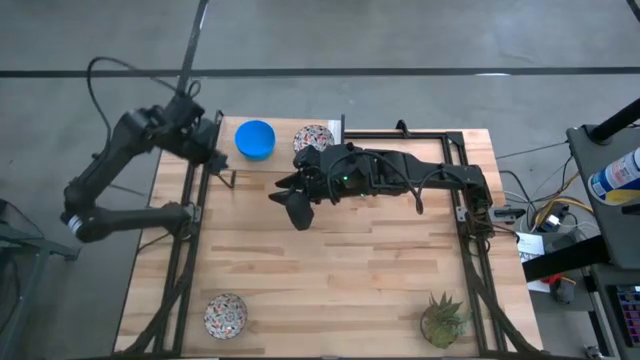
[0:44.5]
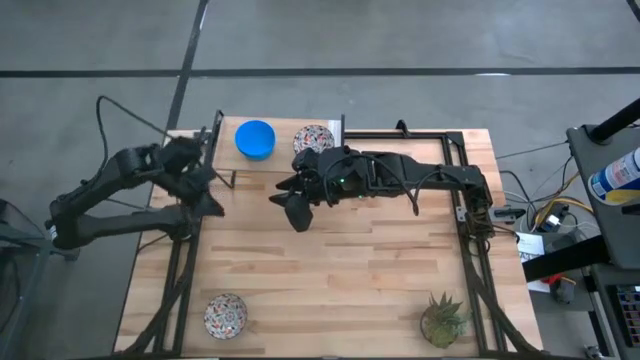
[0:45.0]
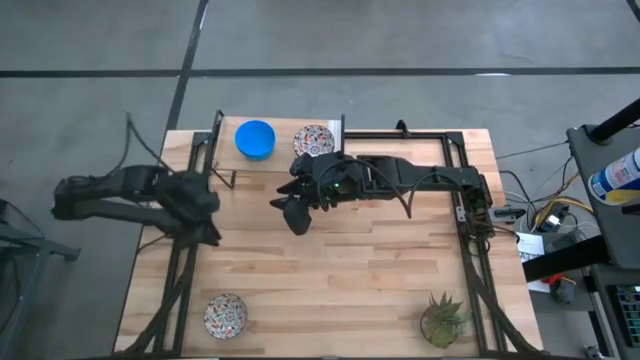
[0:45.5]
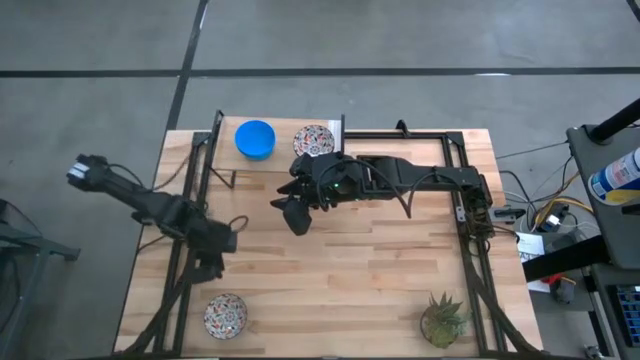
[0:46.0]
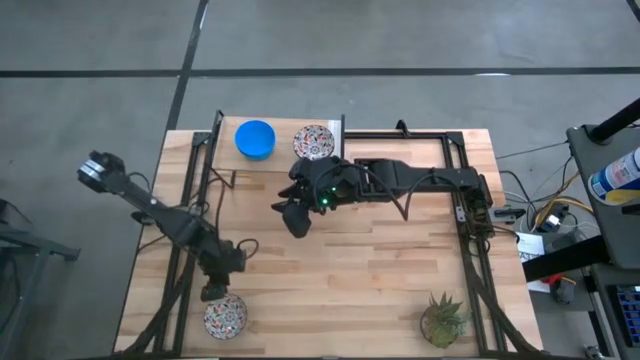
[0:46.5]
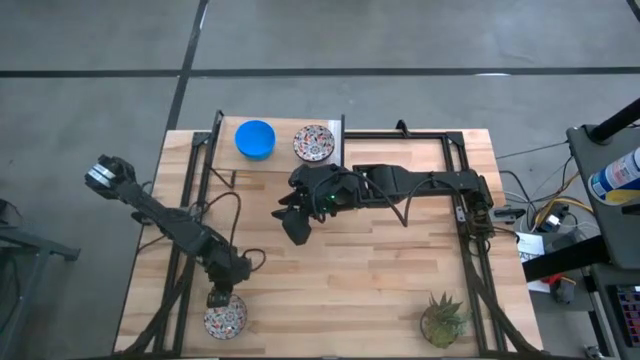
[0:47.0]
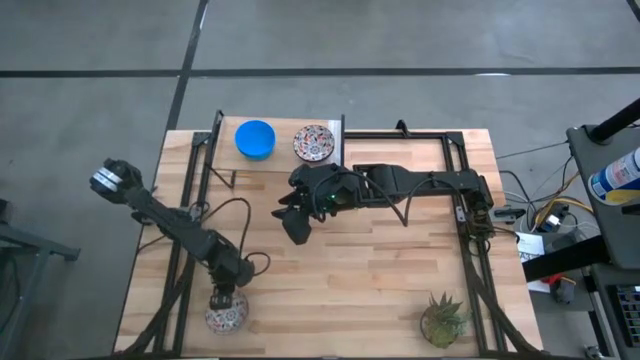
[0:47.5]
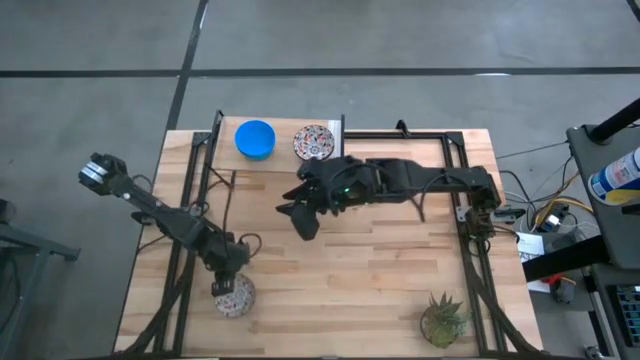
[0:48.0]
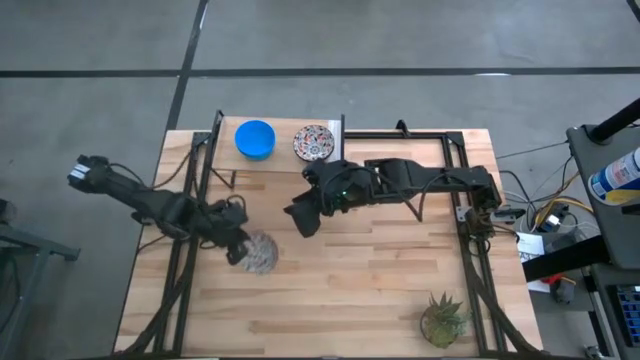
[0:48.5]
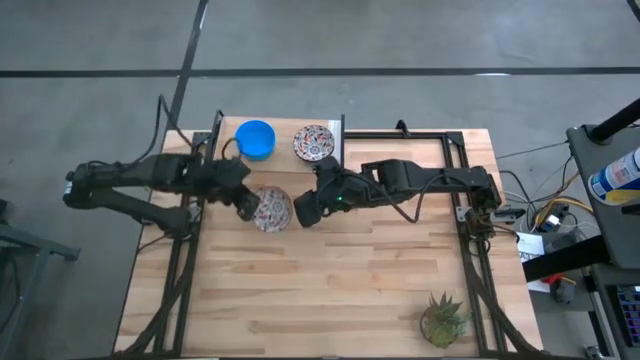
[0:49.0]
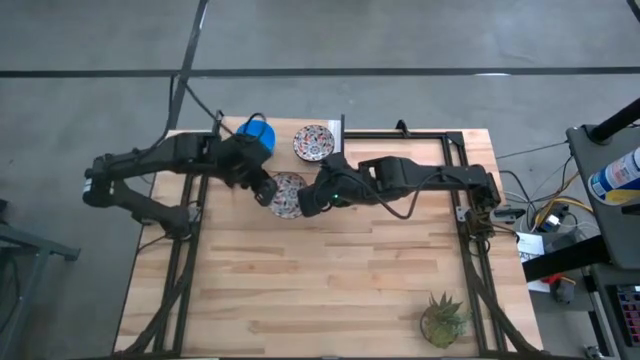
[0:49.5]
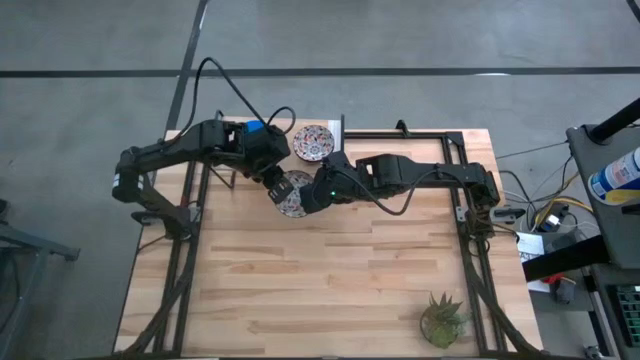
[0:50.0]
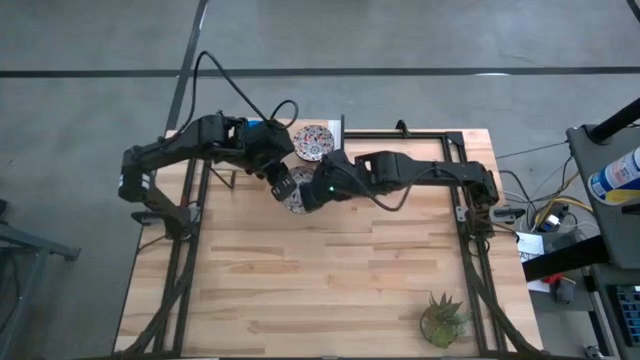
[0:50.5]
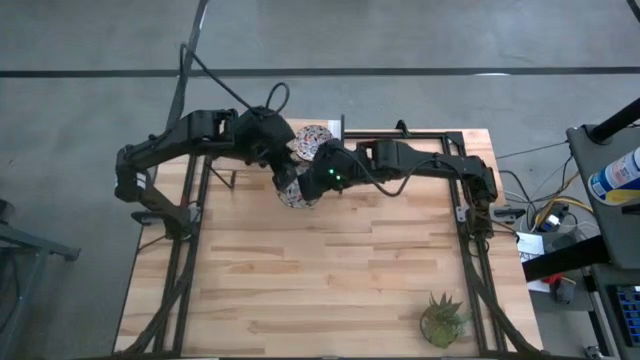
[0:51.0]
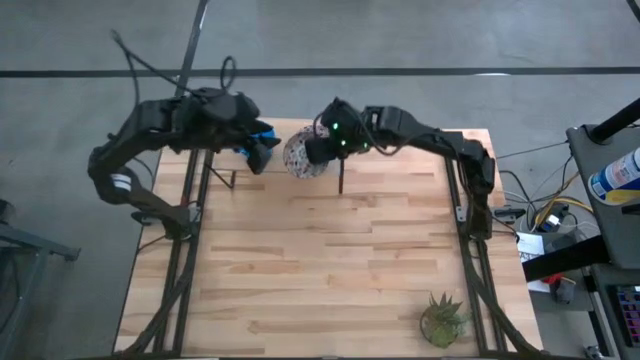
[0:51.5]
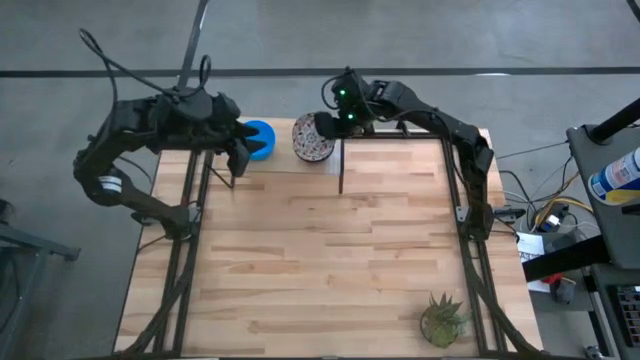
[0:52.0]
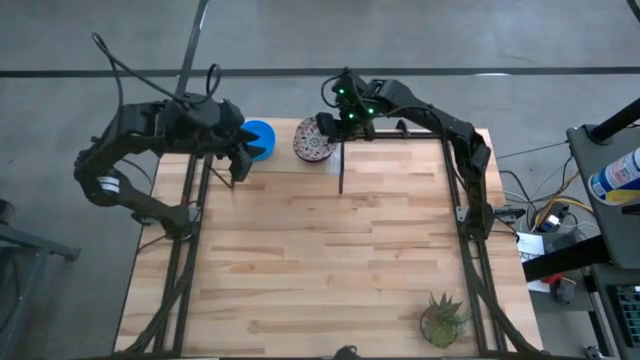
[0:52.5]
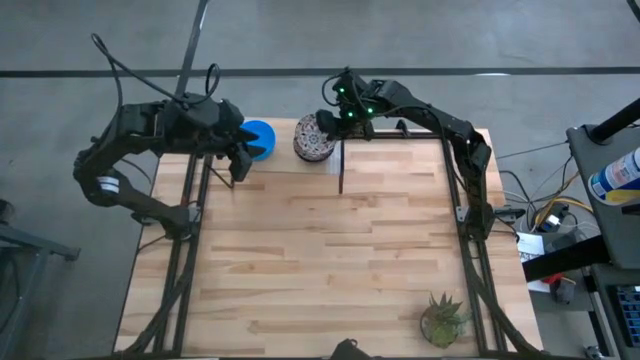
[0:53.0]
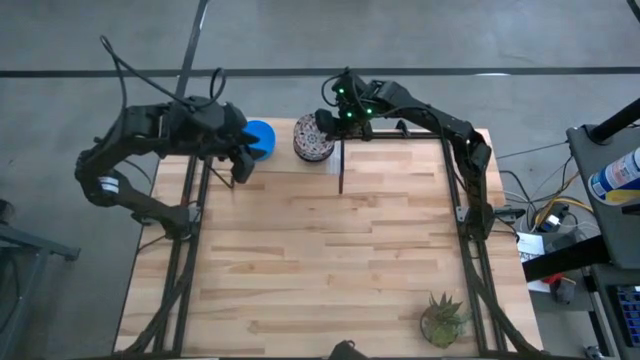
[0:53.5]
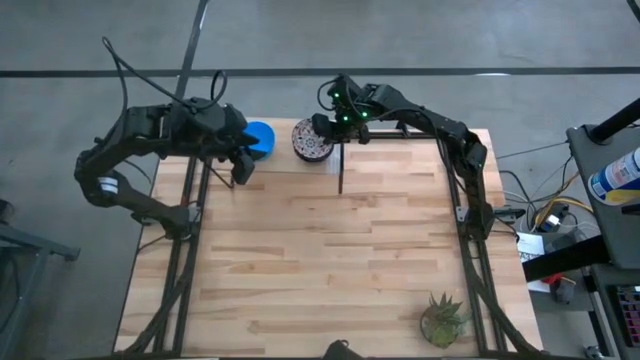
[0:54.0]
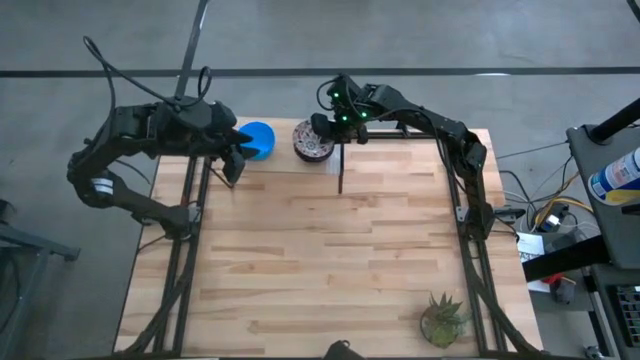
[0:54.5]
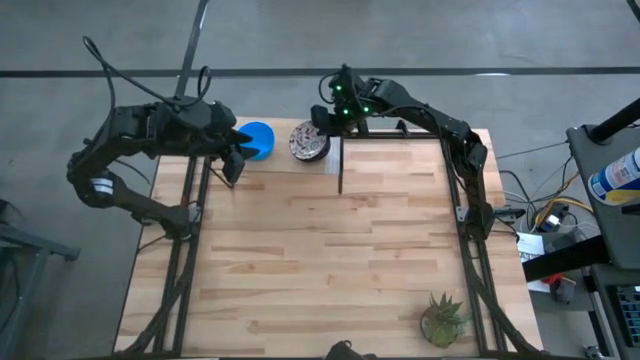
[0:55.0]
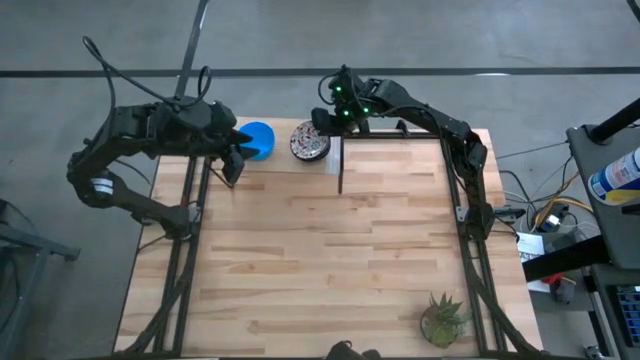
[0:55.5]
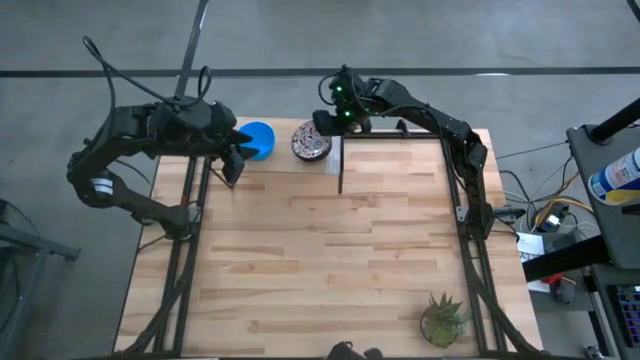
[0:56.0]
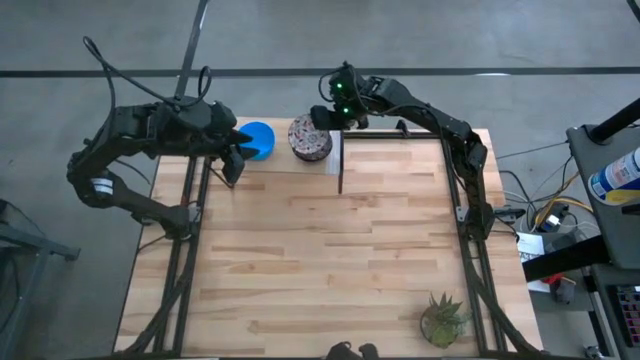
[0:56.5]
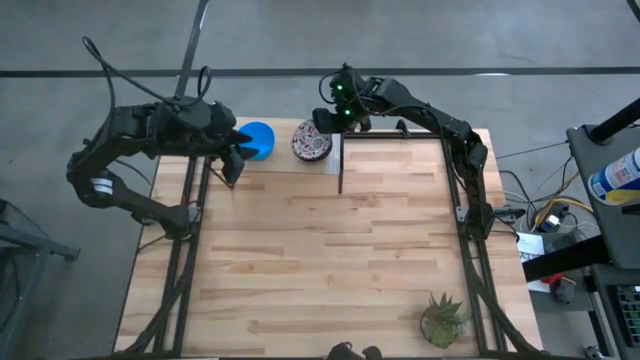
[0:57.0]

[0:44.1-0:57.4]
Task: Pick & Place Mini bowls
Stack the white patterned bowl on top of the white patterned bowls on the shelf

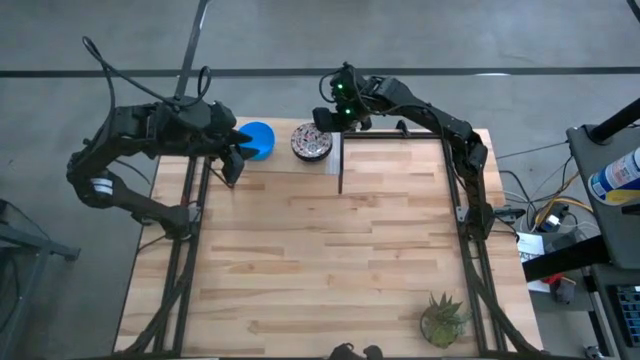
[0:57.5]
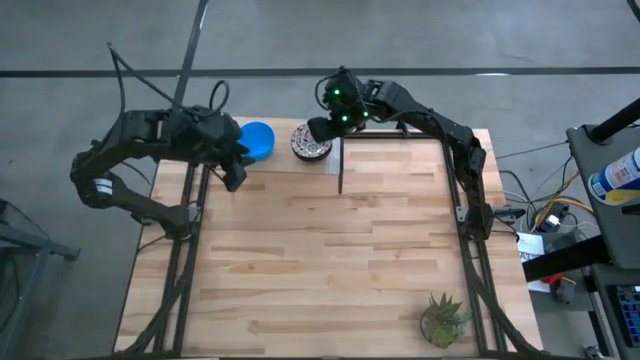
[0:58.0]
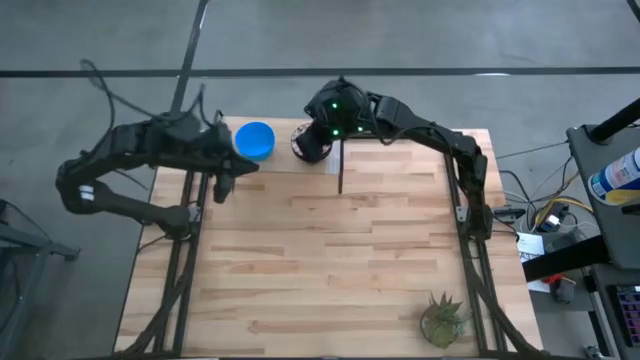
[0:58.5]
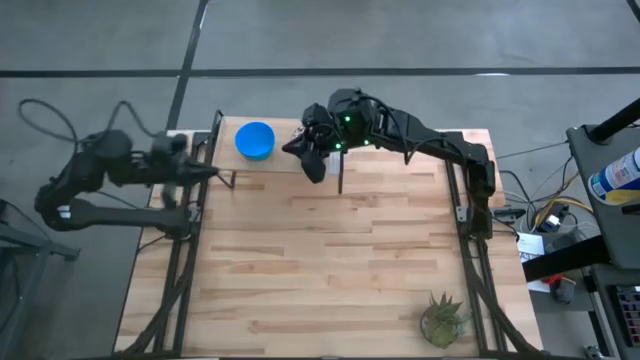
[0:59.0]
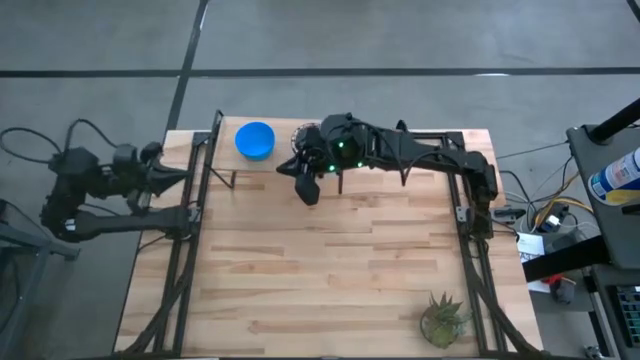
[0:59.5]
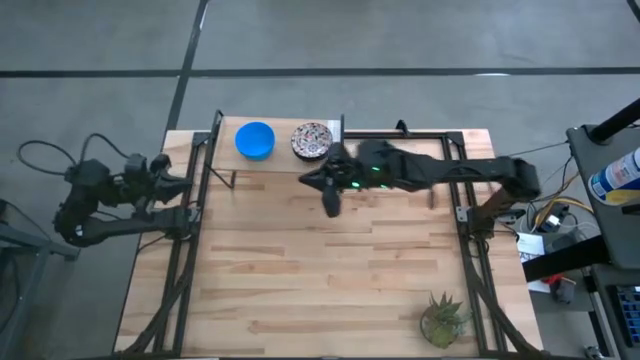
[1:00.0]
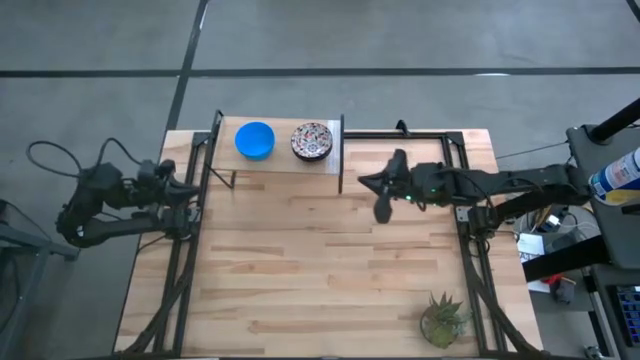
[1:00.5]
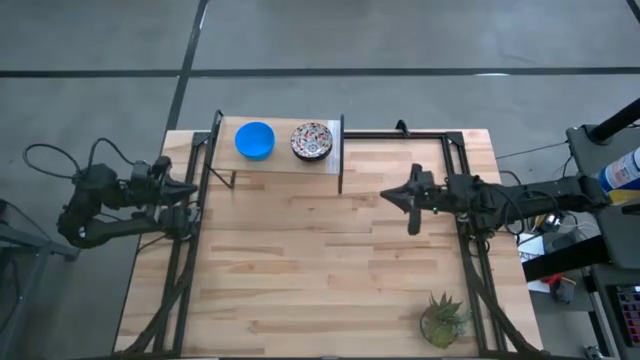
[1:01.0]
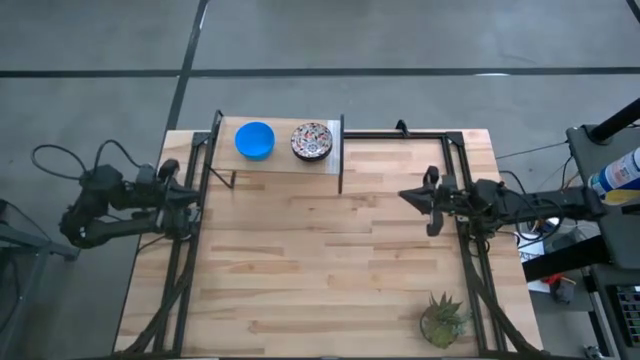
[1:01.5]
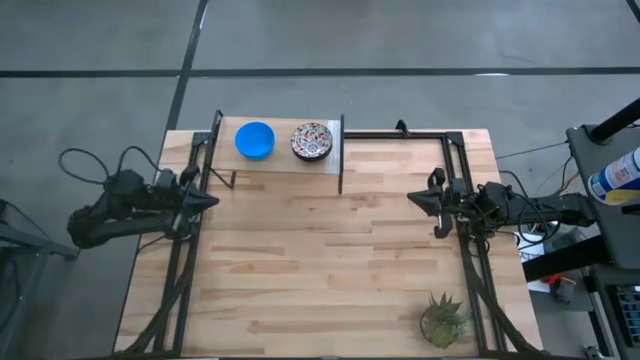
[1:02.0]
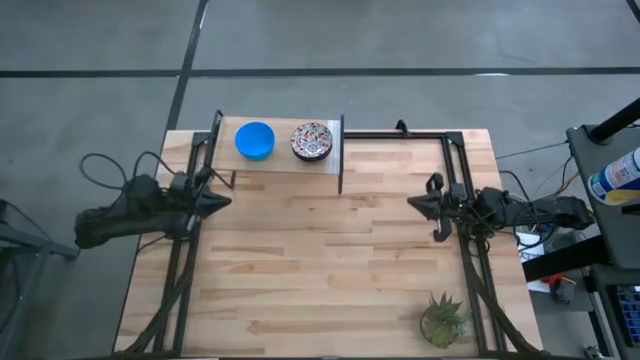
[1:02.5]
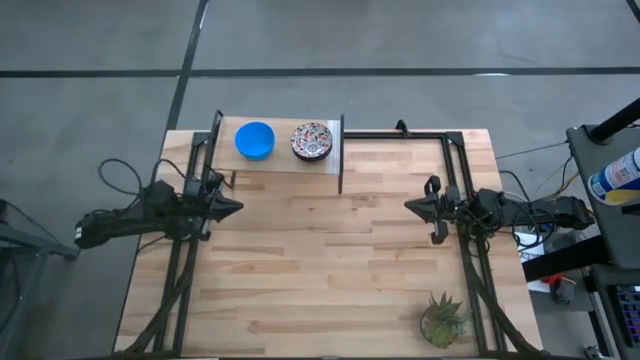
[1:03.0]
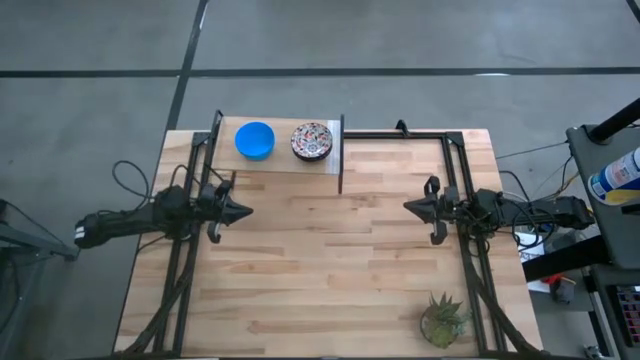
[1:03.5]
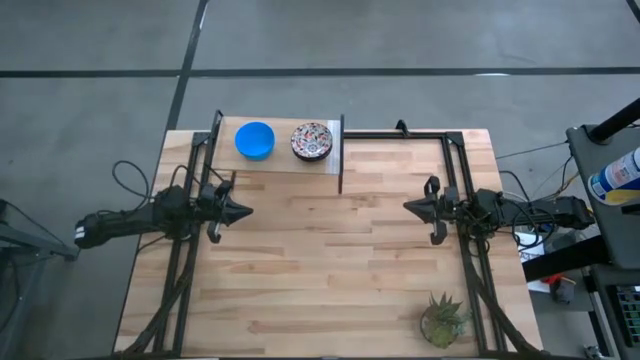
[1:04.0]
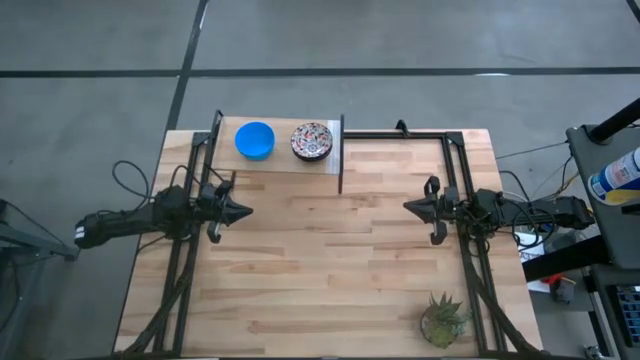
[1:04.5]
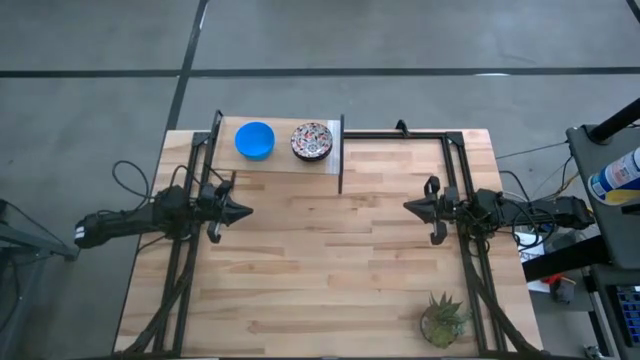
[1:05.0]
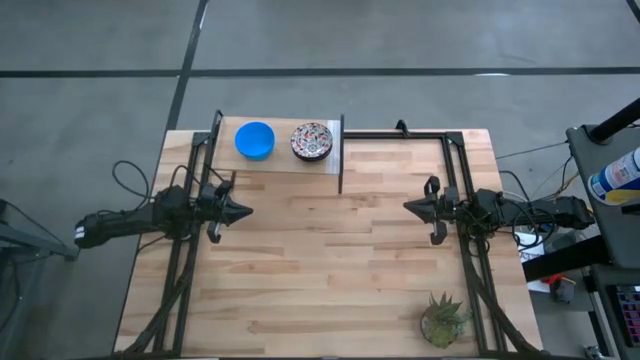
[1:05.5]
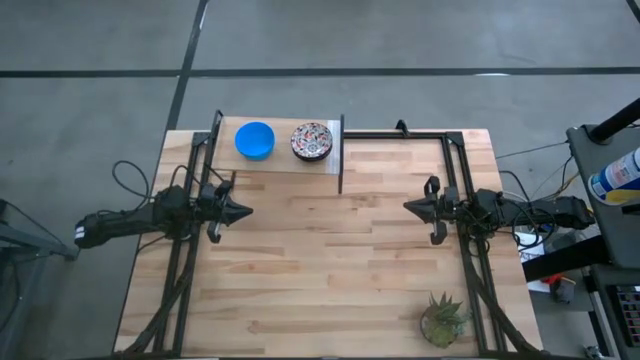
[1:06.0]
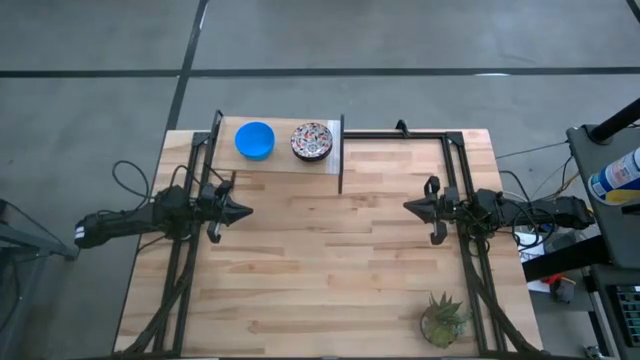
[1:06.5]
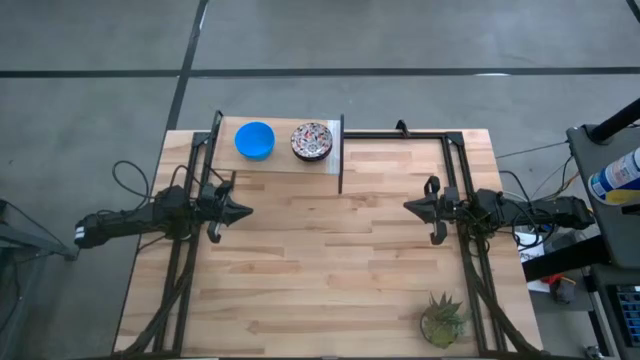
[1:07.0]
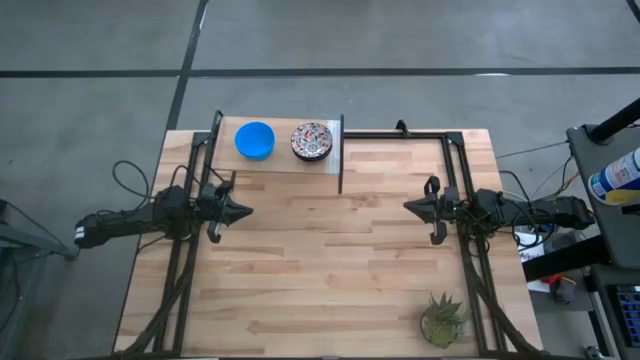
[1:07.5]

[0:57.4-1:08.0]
Return to Home Position
